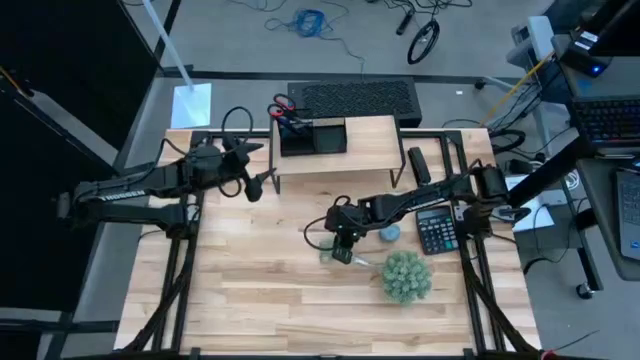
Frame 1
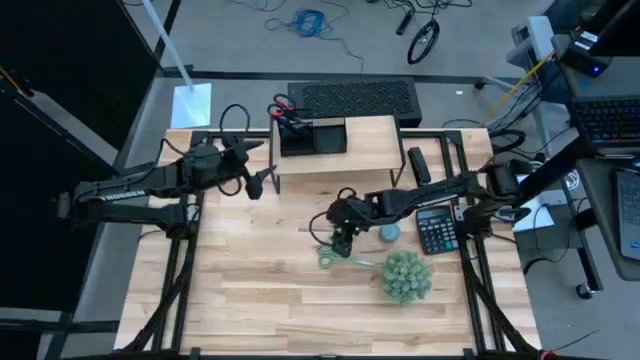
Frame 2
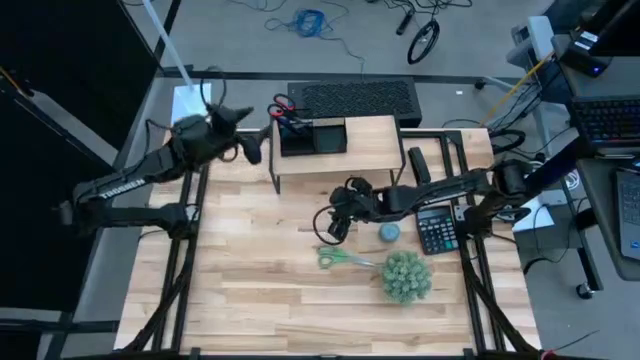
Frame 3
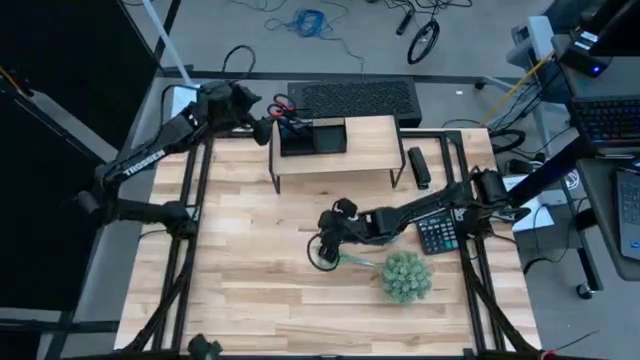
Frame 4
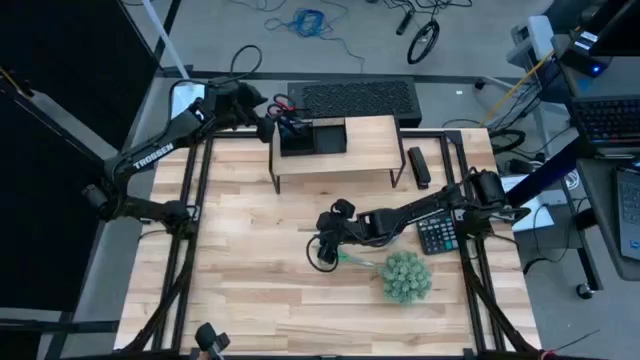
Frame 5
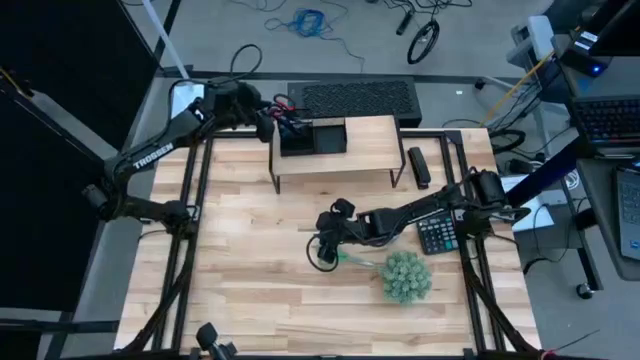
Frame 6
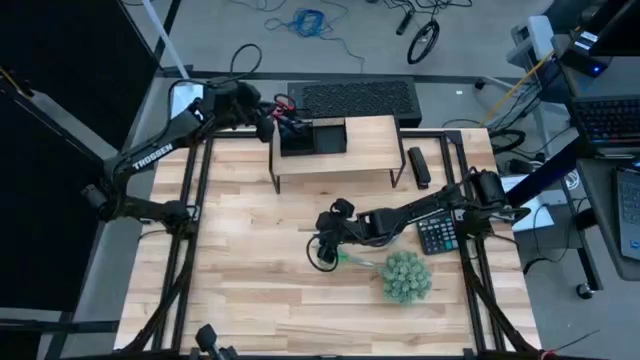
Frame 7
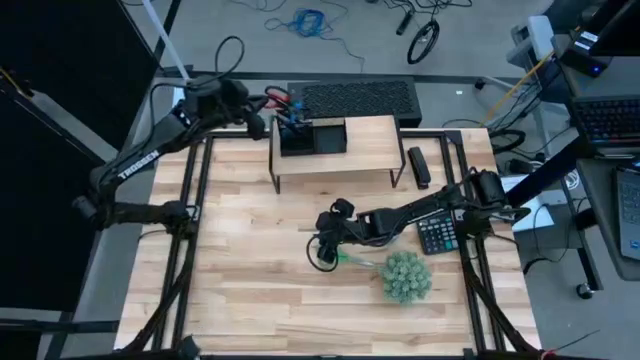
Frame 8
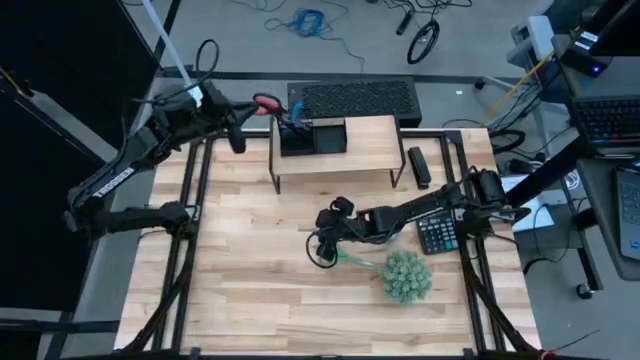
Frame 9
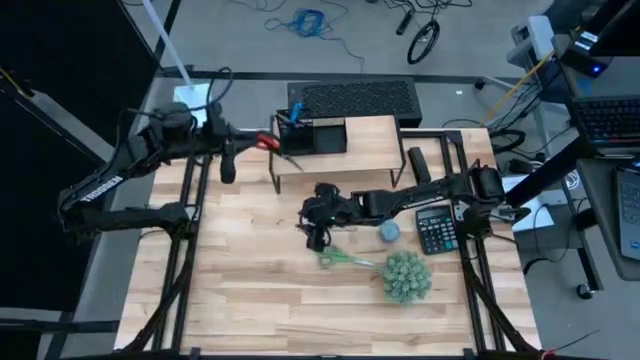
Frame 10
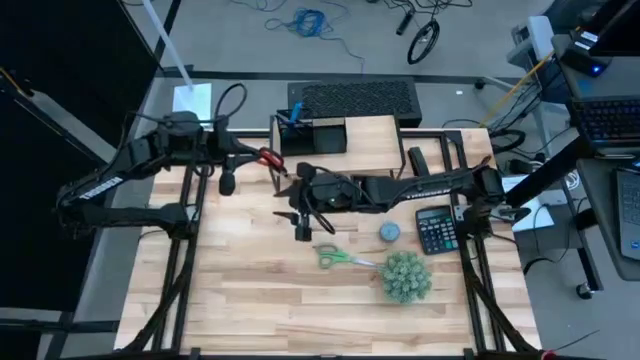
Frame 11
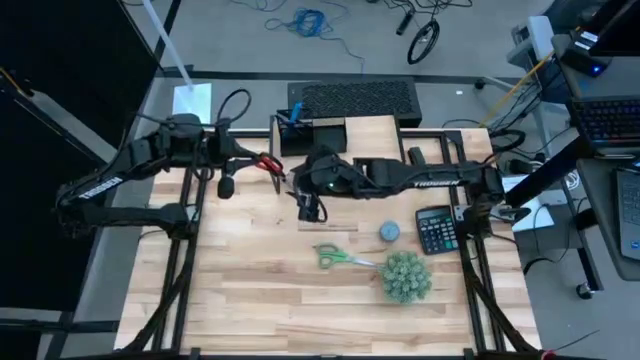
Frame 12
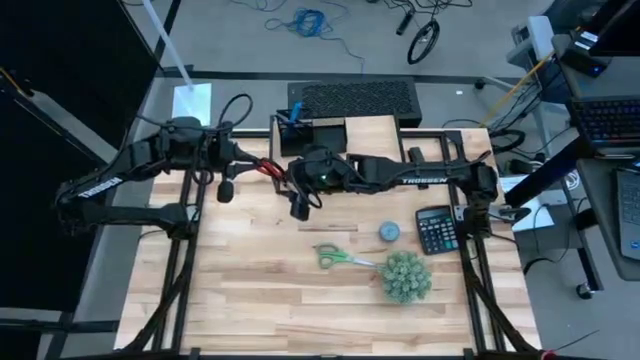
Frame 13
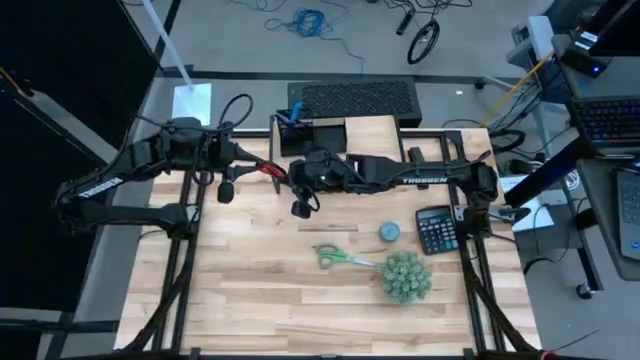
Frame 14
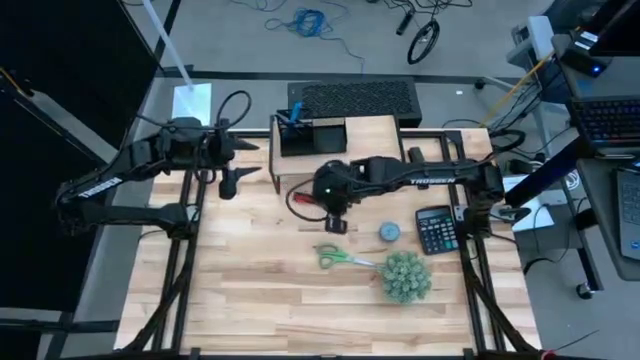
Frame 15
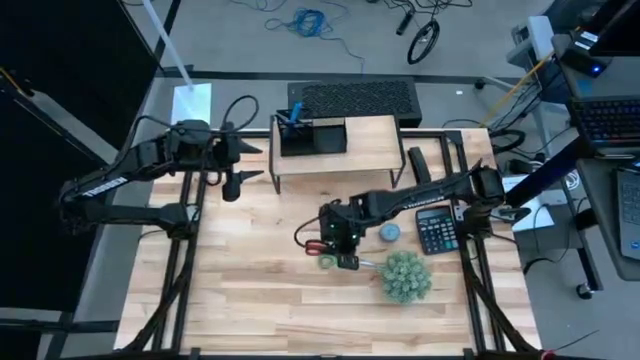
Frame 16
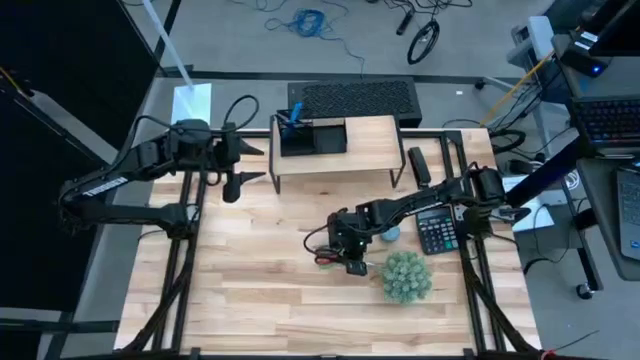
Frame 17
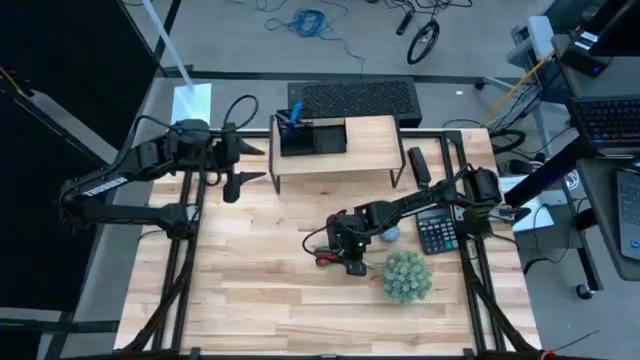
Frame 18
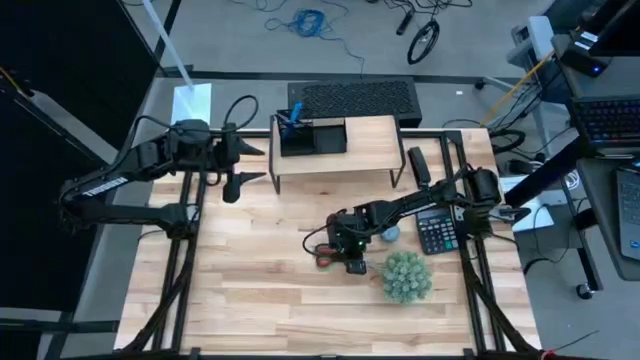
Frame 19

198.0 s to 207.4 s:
Task: Pick and place office supplies into organizer
Remove the black scissors from the desk organizer on the shelf

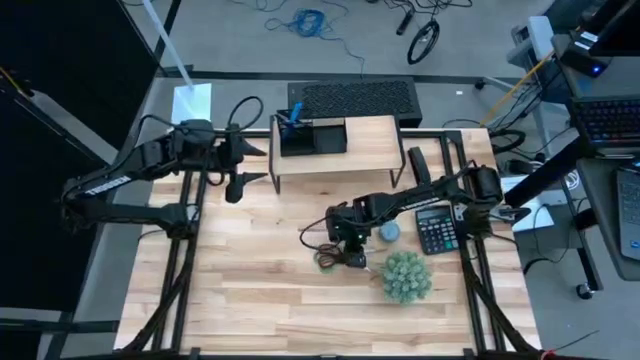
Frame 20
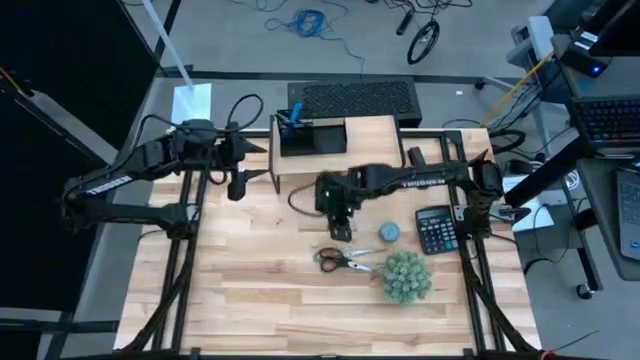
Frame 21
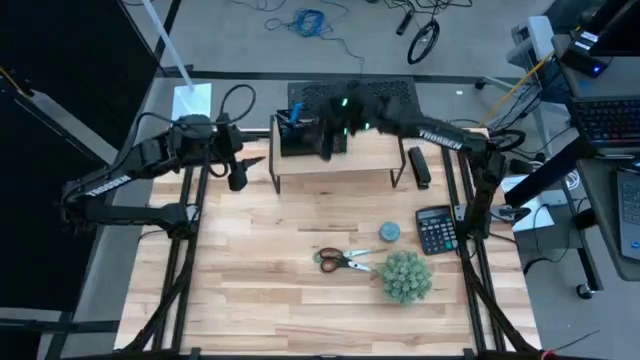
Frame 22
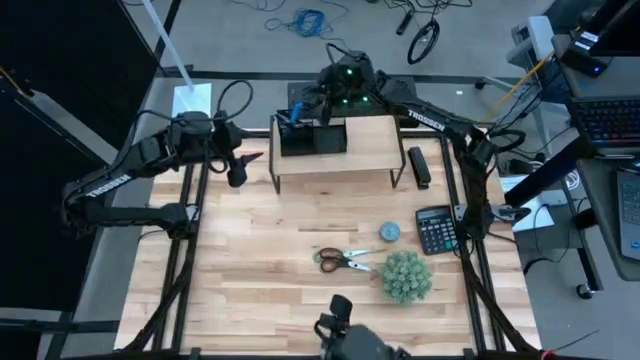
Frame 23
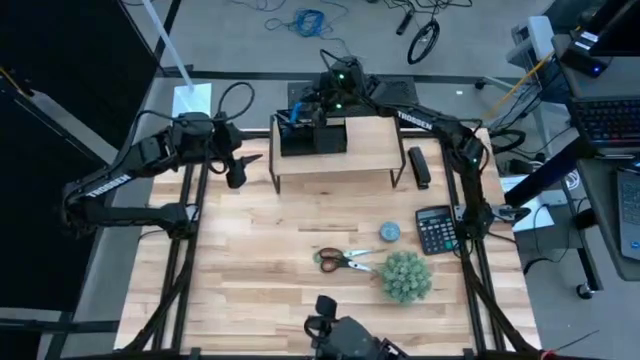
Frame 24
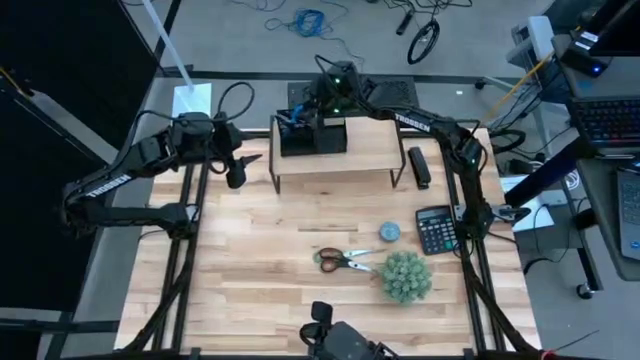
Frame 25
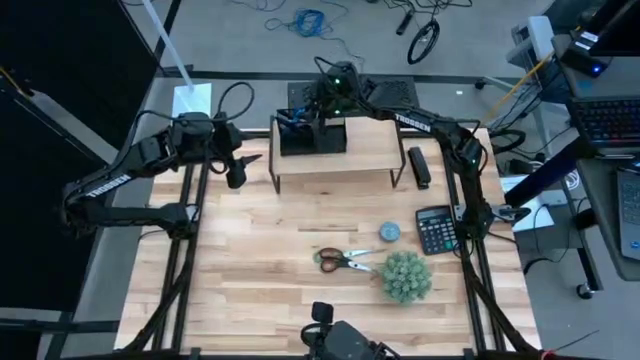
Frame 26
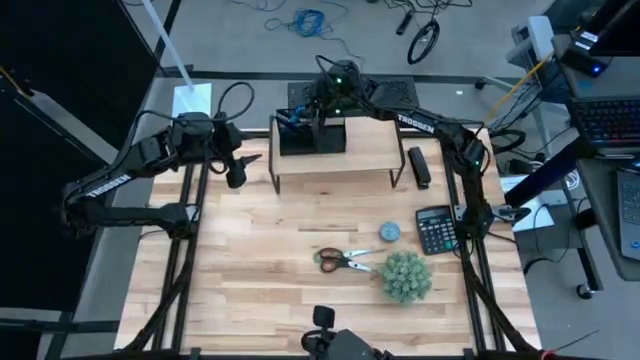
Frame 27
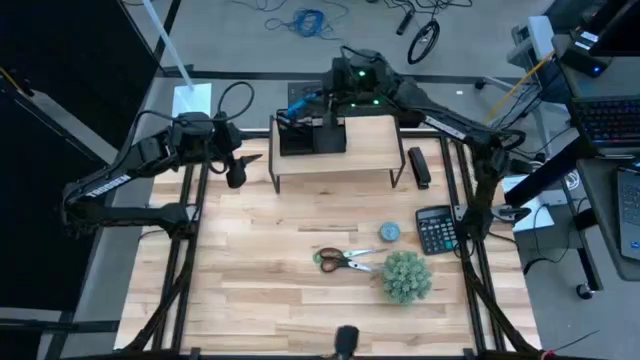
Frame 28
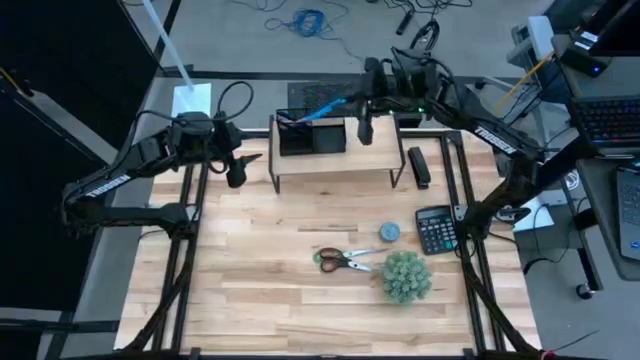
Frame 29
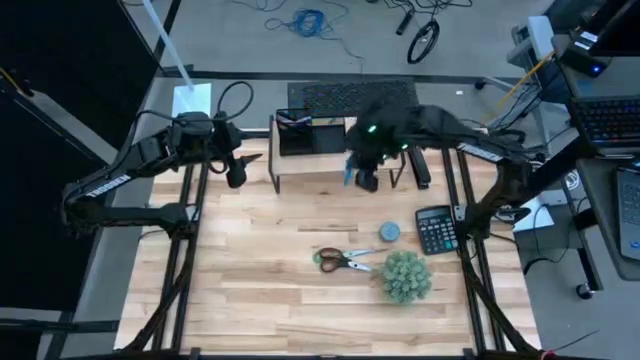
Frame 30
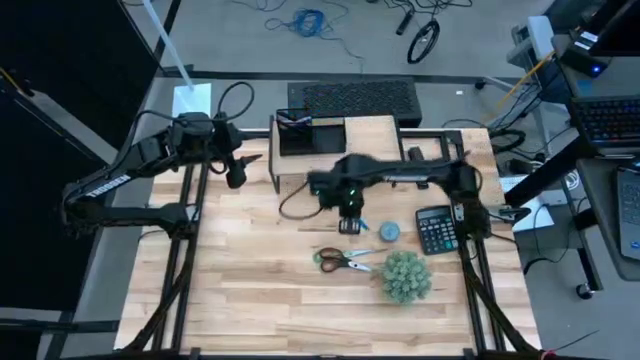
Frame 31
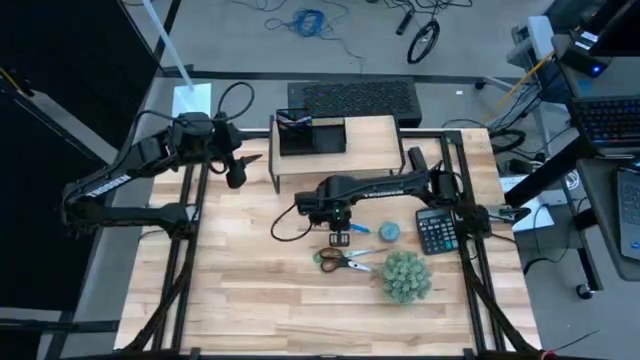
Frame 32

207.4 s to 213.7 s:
Remove the blue pen from the desk organizer on the shelf

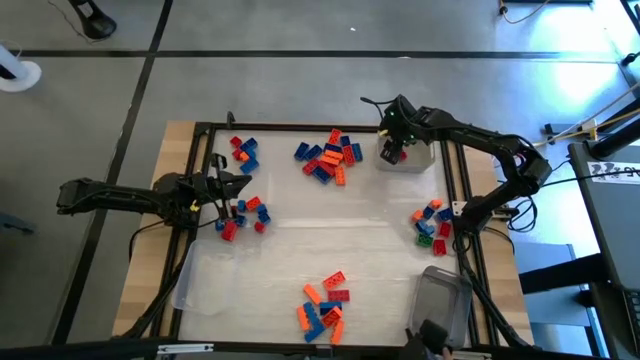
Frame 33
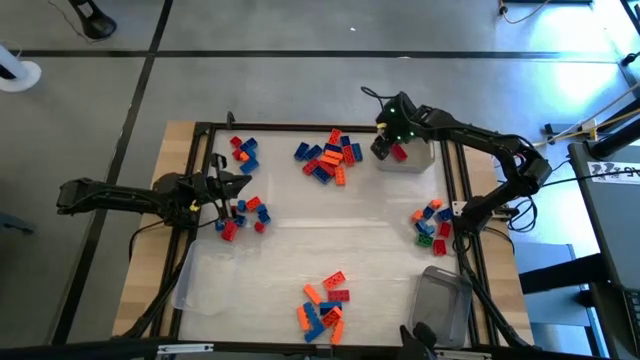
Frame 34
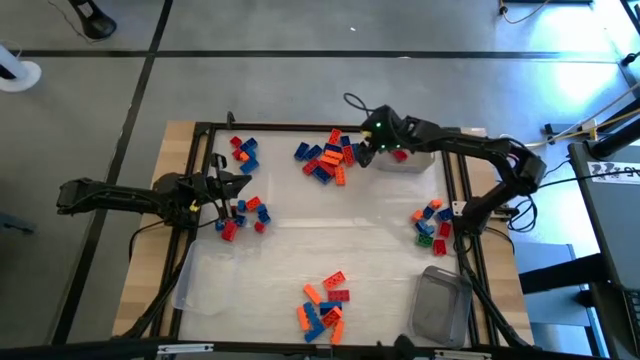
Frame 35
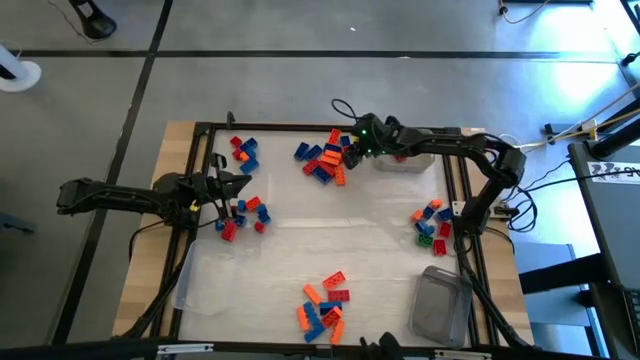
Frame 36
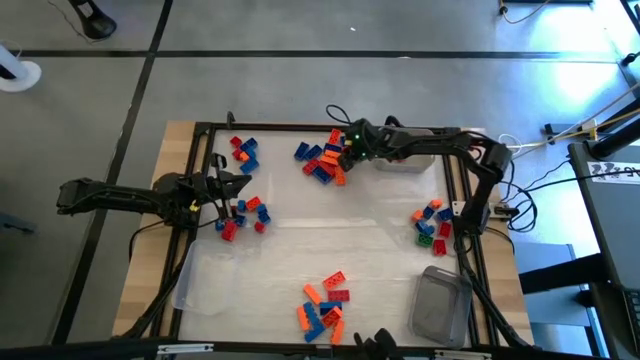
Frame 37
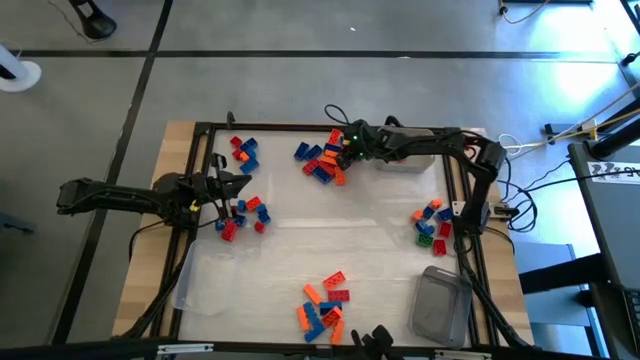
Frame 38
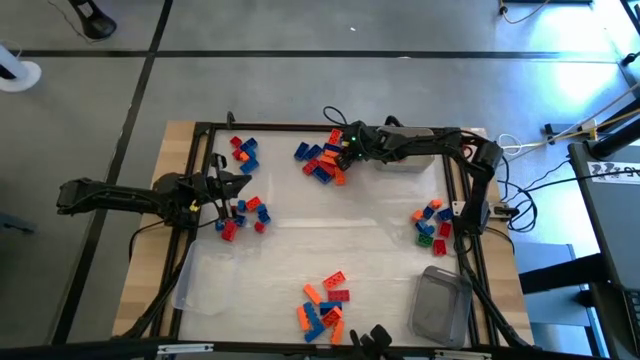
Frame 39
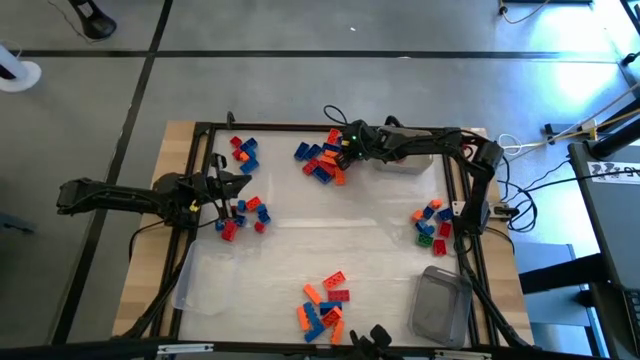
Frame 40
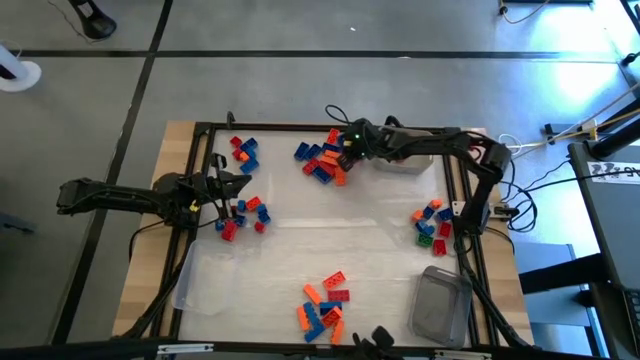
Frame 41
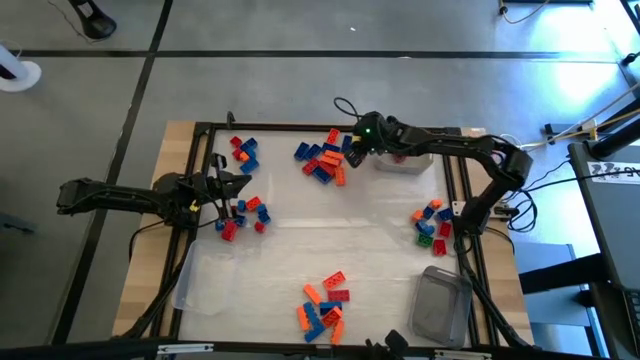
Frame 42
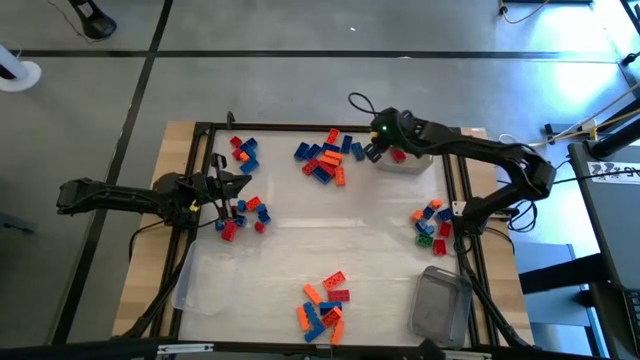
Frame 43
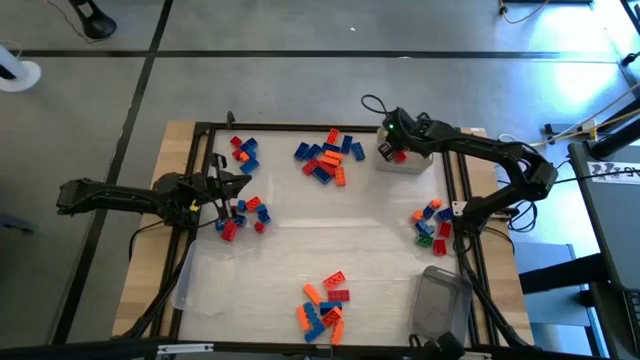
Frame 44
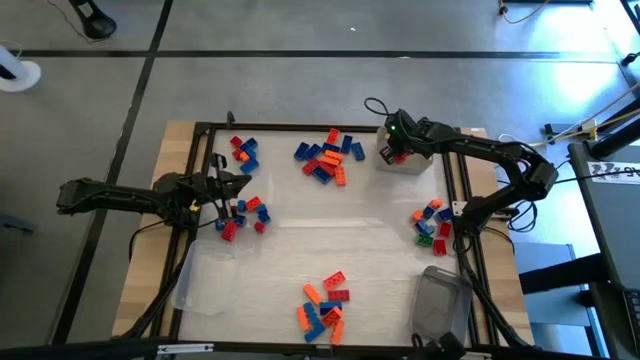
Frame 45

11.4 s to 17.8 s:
Task: Sort blocks by size
Put the orange game piece into the gray bin
